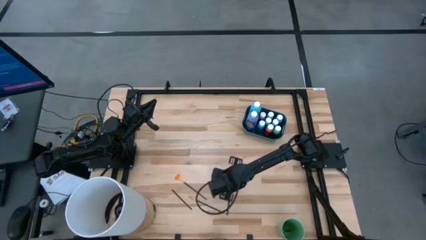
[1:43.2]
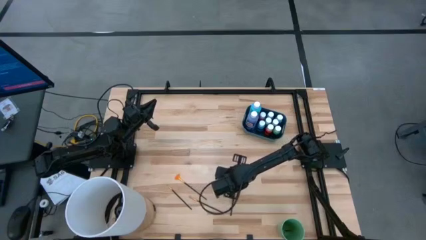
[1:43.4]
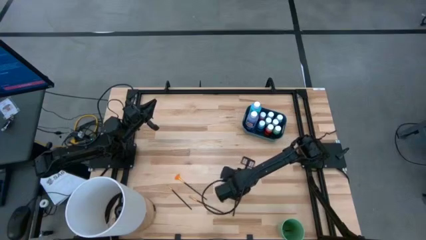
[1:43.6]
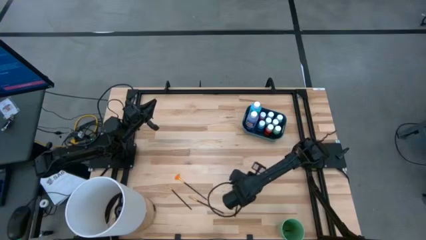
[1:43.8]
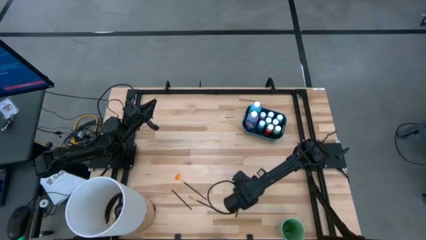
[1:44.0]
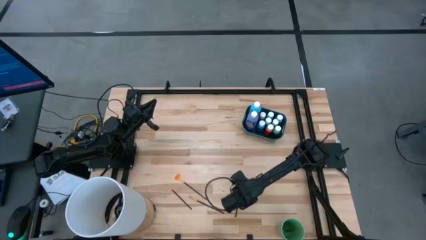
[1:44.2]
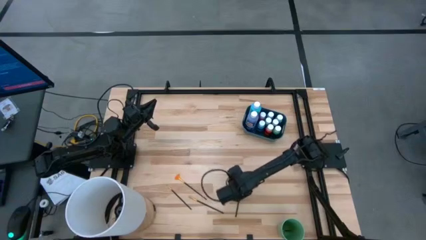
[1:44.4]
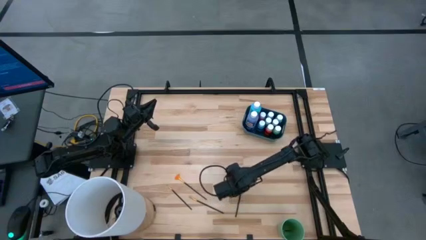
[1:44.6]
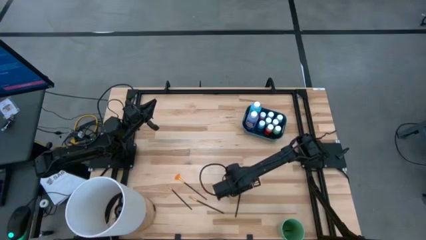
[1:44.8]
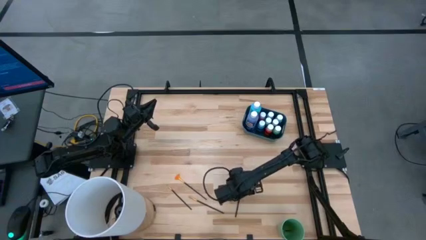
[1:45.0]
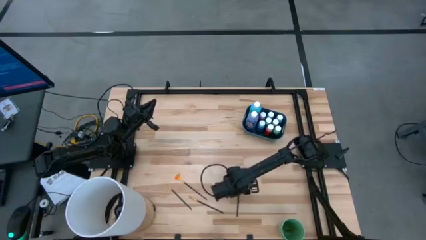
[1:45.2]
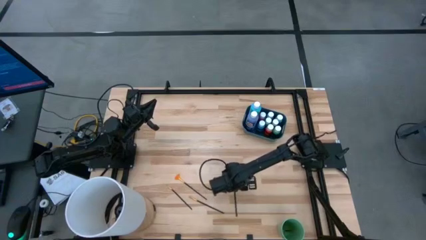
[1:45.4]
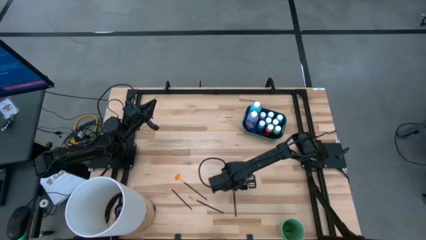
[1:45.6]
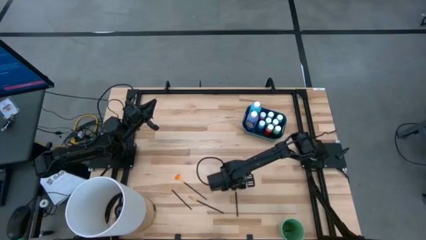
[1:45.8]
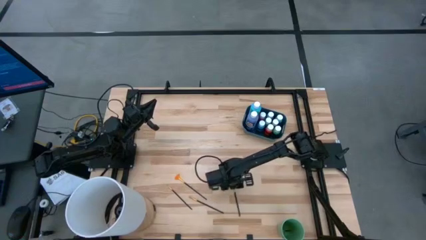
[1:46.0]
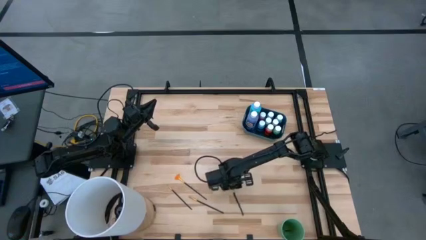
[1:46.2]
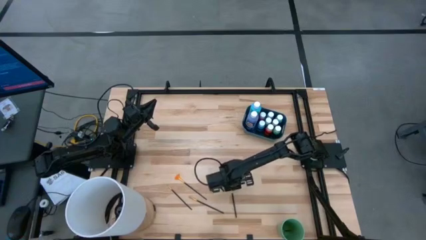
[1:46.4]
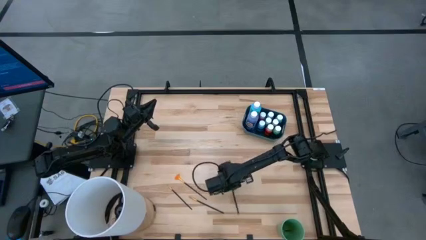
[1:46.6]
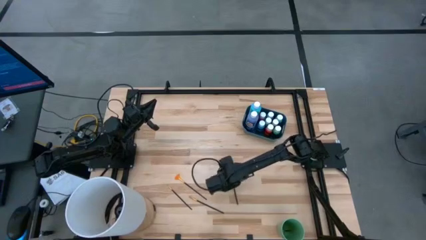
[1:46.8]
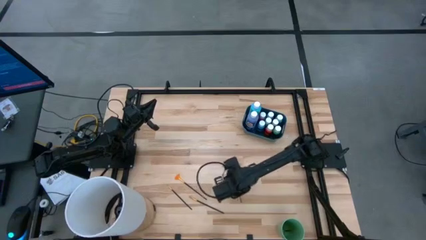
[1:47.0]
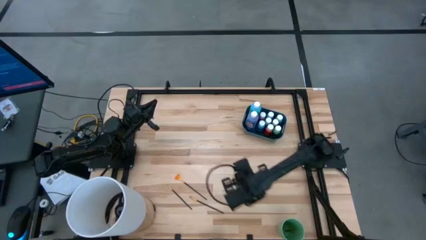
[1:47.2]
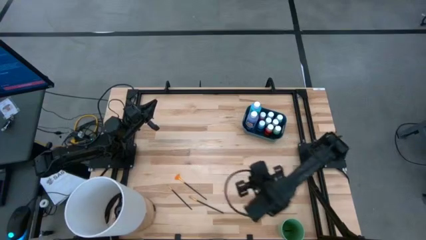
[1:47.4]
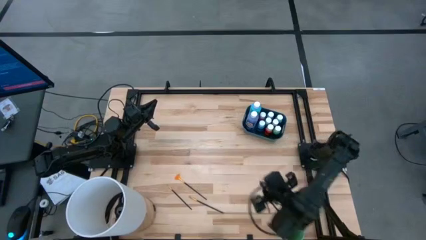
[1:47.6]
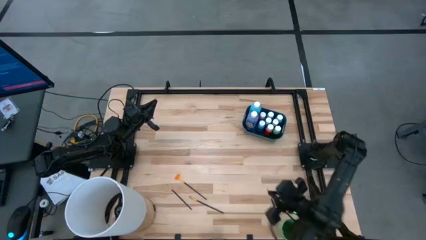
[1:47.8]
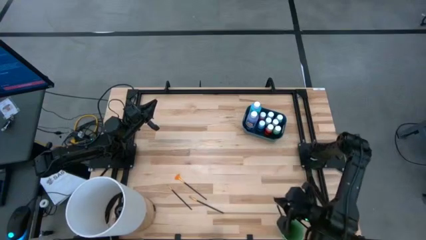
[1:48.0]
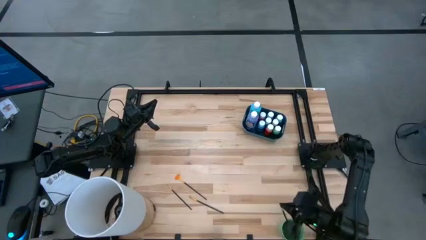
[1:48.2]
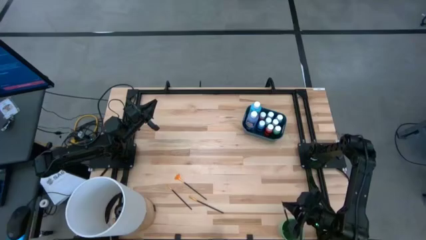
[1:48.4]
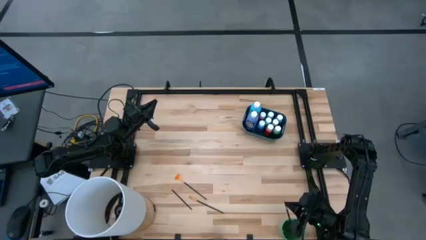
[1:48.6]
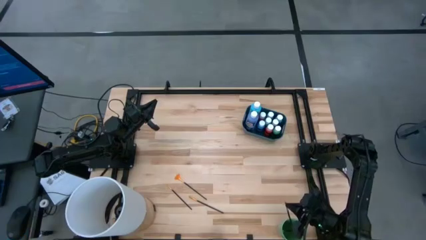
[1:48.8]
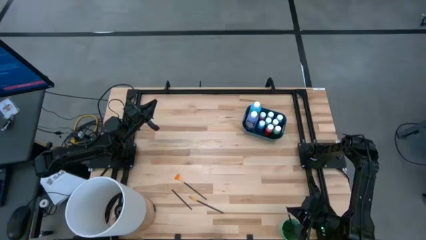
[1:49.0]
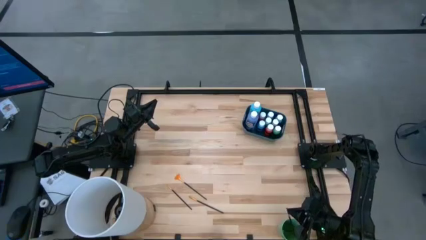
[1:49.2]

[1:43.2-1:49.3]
Task: Pick & Place Paint Supplies
Put the right silver paint brush into the green cup

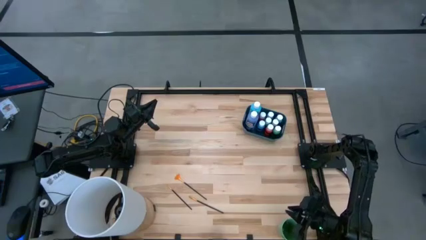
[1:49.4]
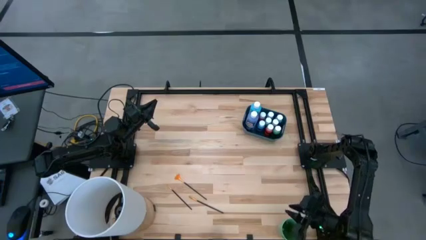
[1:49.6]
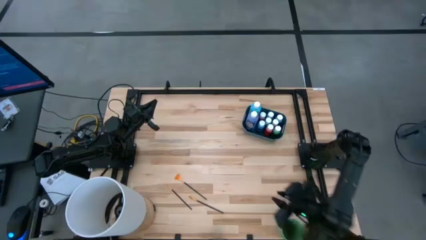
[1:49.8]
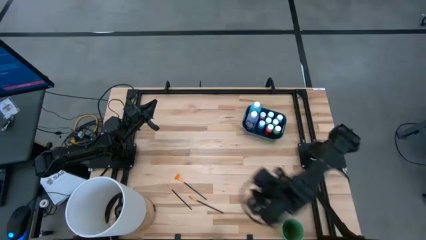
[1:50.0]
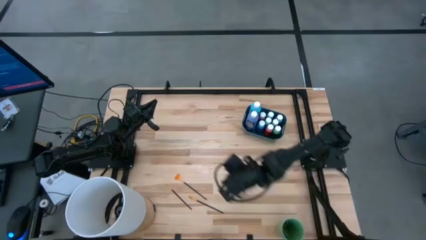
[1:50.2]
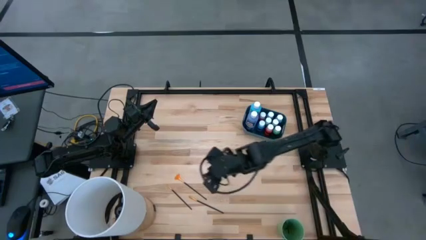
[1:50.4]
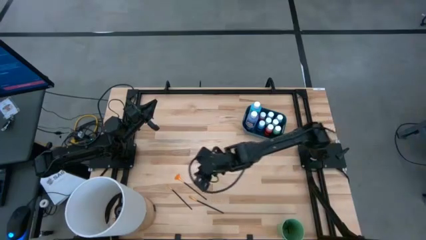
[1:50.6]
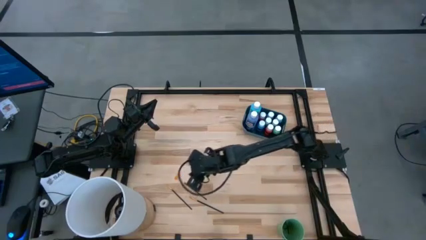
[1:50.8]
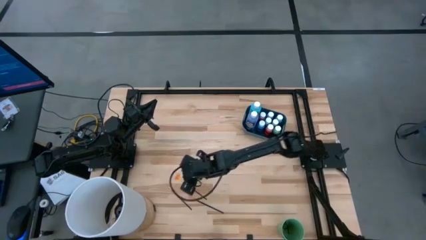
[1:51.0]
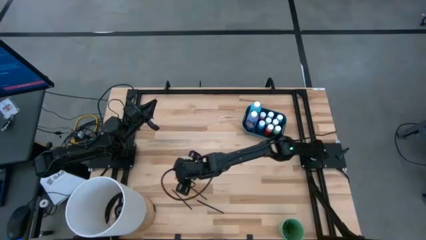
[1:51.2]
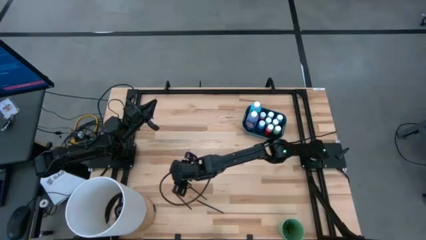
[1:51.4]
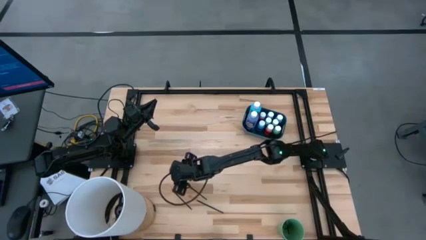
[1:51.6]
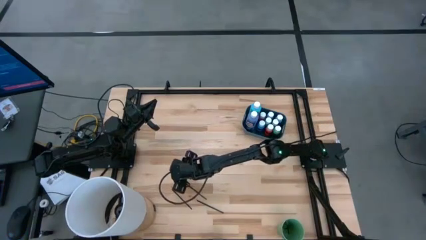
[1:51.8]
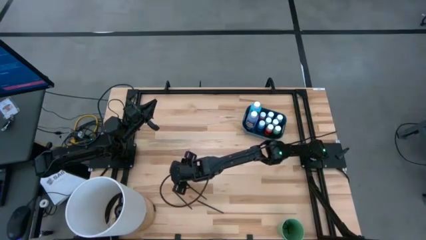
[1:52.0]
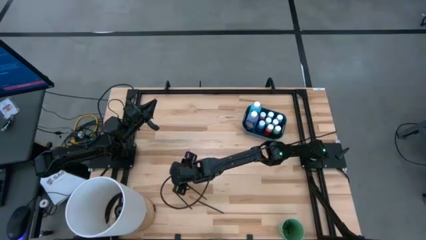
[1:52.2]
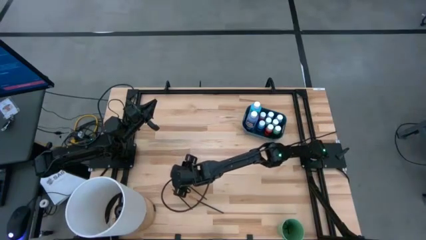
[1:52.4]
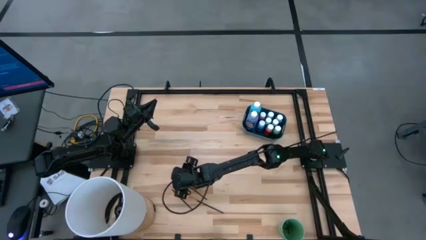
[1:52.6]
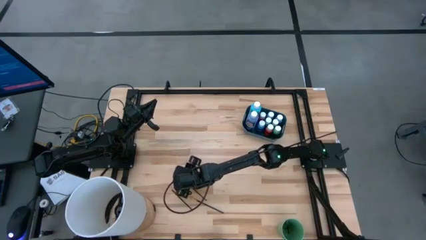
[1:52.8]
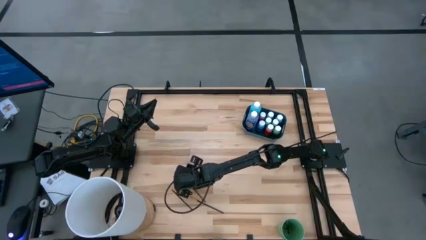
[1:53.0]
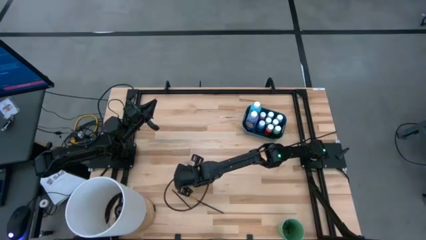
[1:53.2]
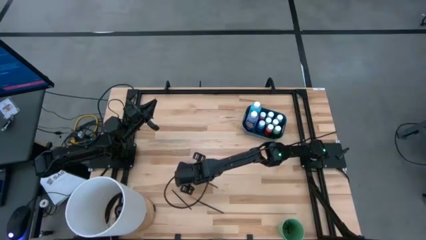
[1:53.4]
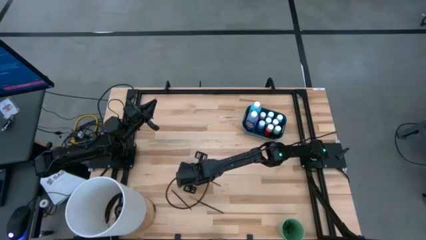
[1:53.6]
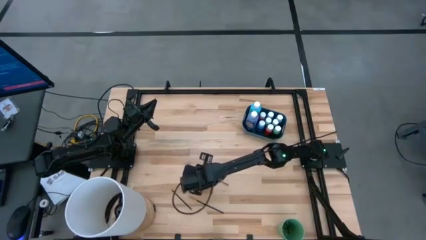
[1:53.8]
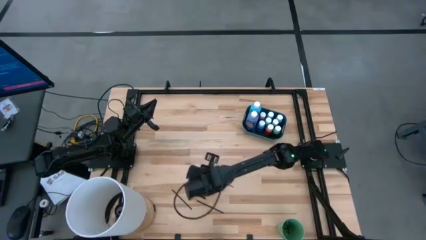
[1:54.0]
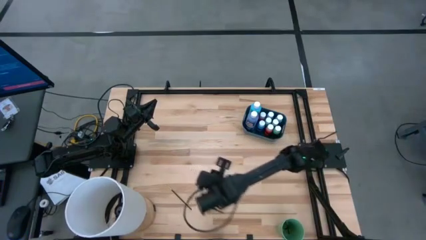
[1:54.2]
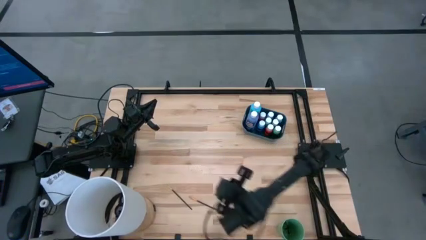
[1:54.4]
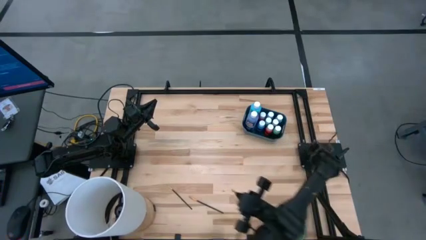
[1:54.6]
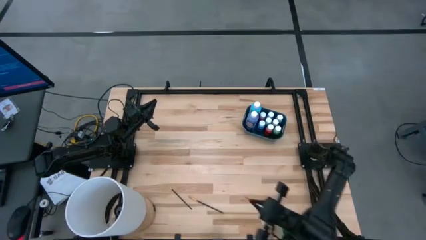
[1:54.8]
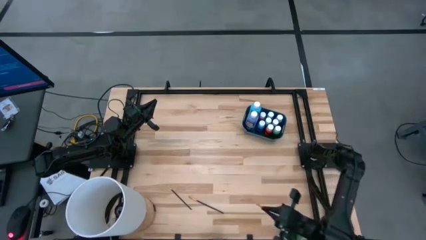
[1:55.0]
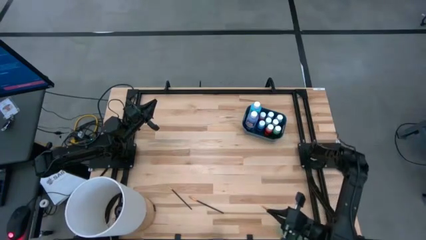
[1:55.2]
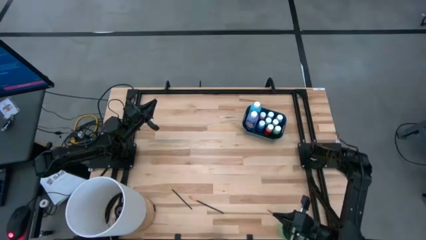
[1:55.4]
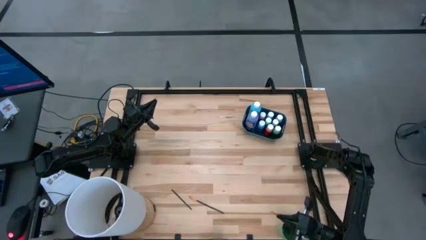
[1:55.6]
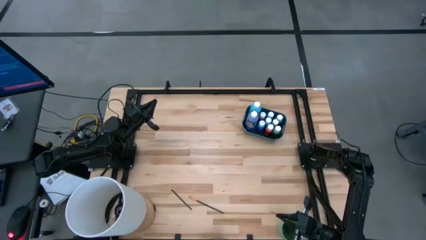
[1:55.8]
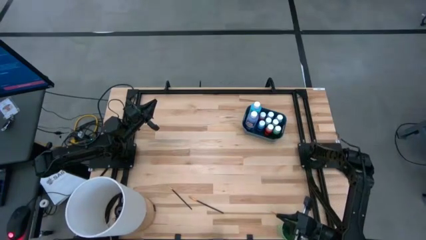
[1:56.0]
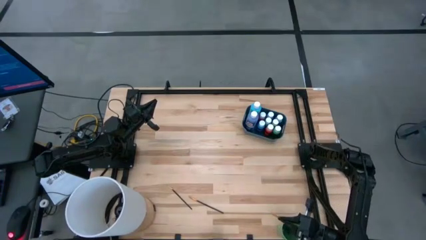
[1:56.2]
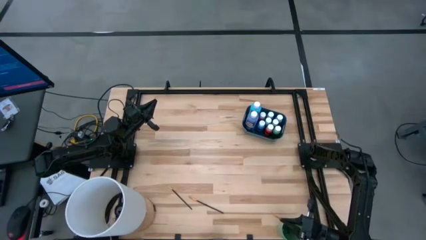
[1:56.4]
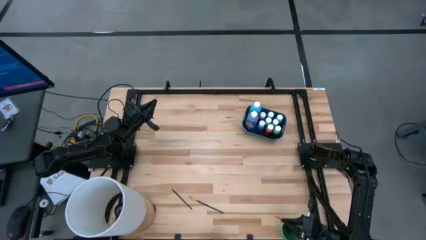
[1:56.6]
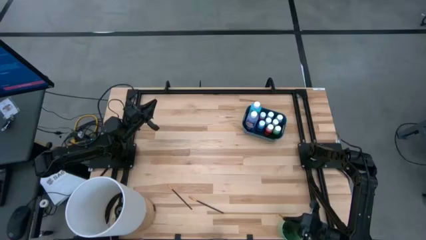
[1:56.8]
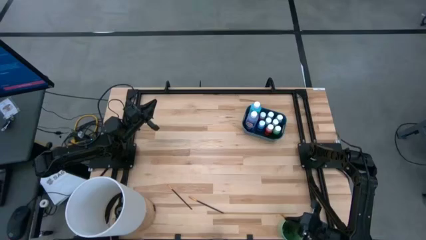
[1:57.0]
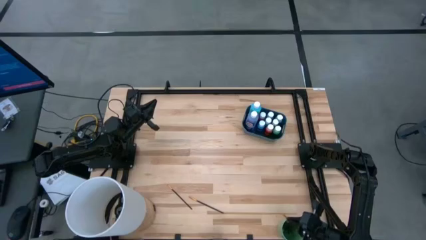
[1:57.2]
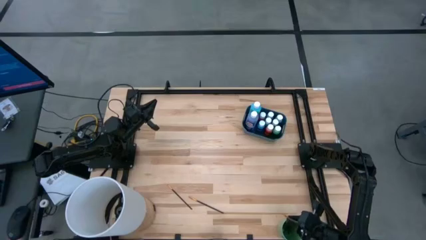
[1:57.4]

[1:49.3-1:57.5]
Put the yellow paint brush into the green cup
